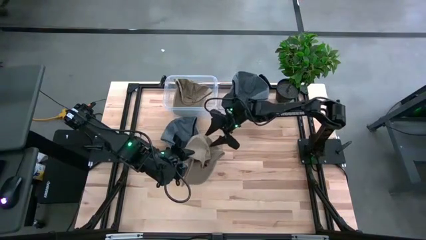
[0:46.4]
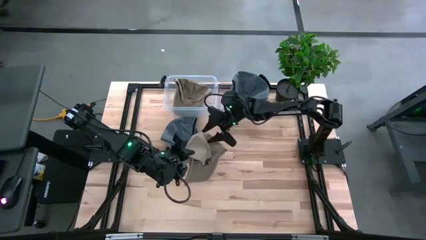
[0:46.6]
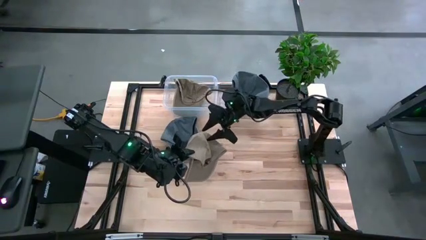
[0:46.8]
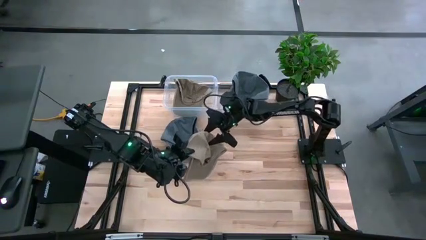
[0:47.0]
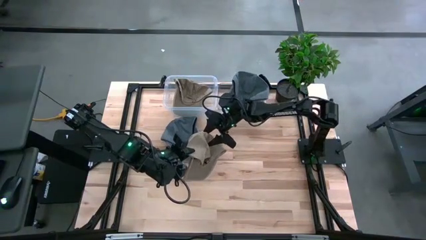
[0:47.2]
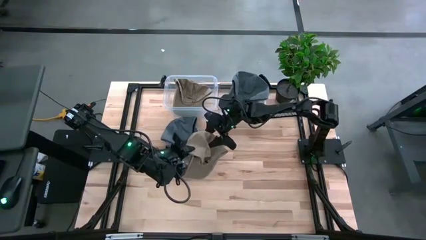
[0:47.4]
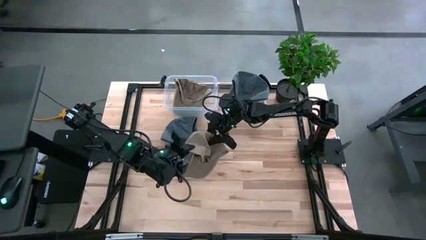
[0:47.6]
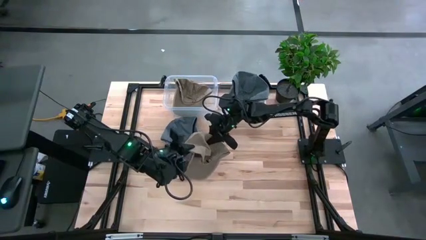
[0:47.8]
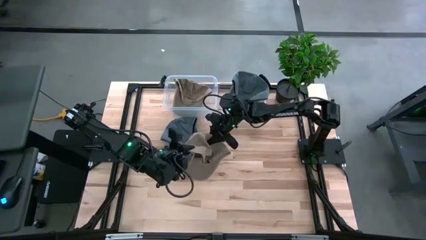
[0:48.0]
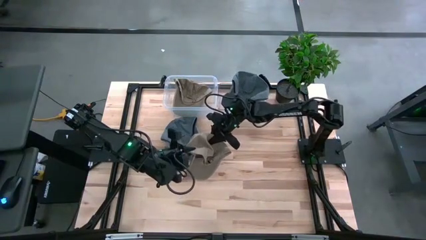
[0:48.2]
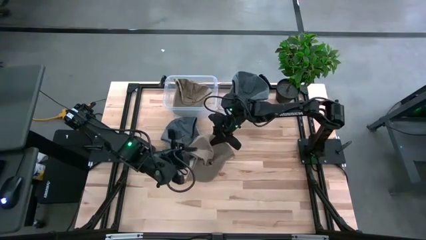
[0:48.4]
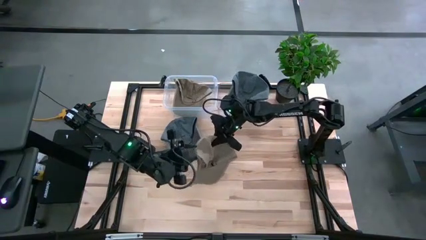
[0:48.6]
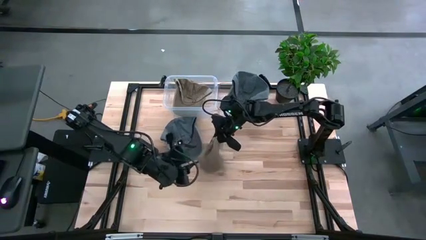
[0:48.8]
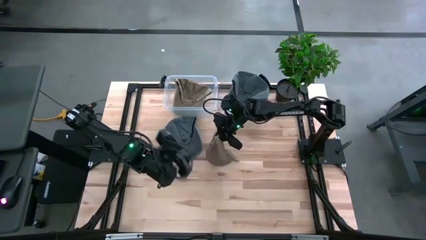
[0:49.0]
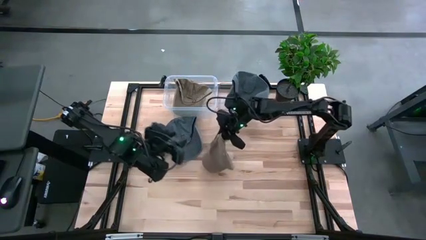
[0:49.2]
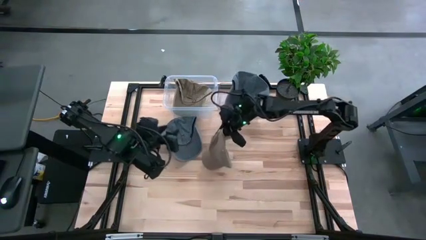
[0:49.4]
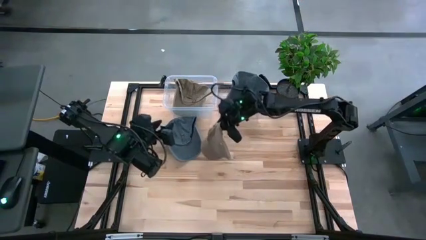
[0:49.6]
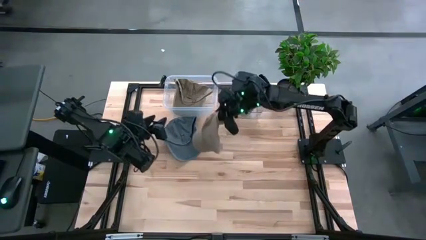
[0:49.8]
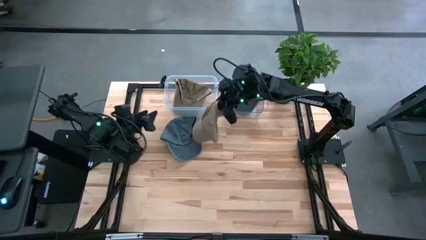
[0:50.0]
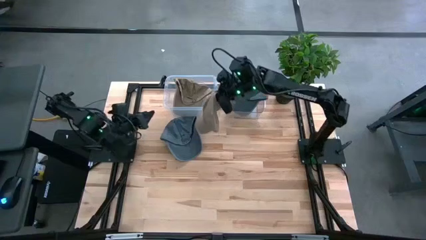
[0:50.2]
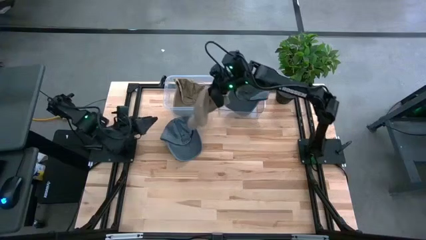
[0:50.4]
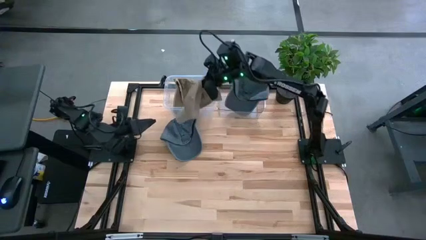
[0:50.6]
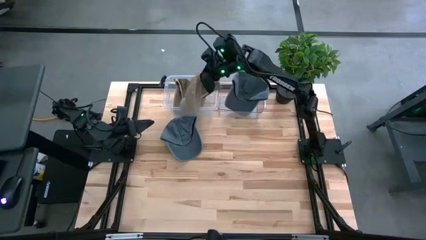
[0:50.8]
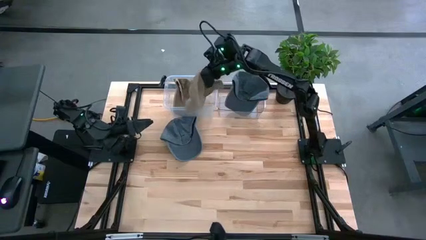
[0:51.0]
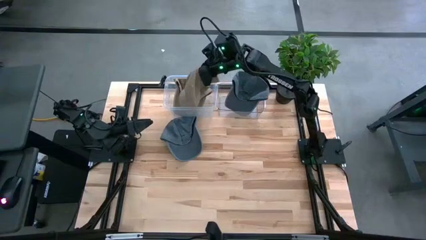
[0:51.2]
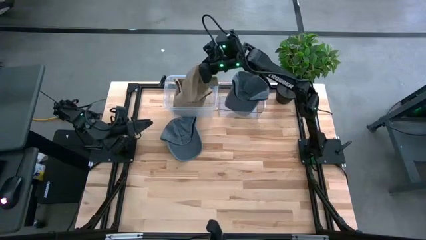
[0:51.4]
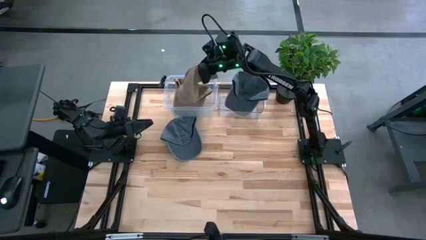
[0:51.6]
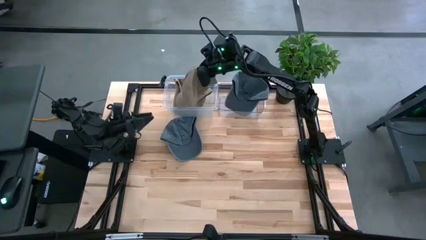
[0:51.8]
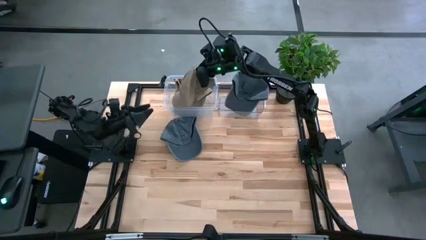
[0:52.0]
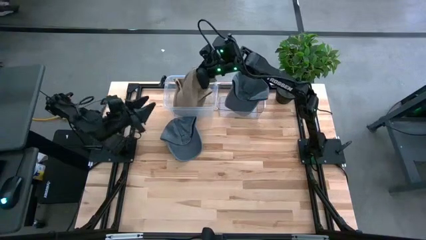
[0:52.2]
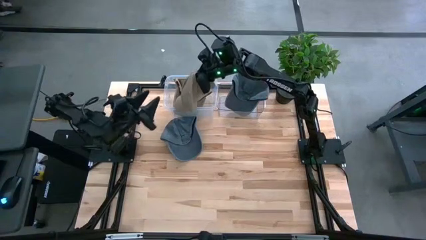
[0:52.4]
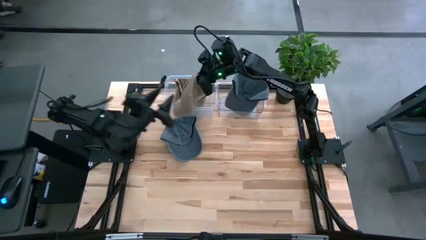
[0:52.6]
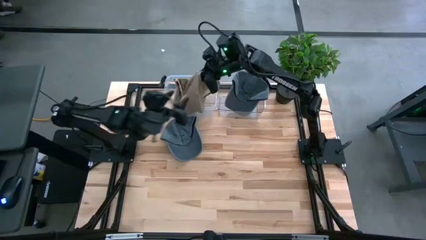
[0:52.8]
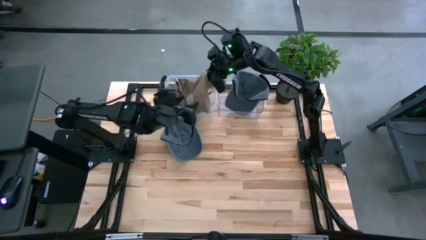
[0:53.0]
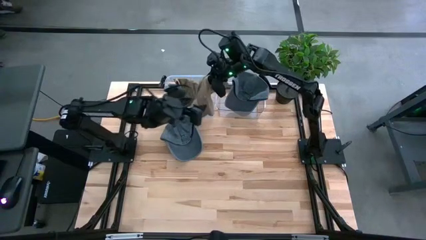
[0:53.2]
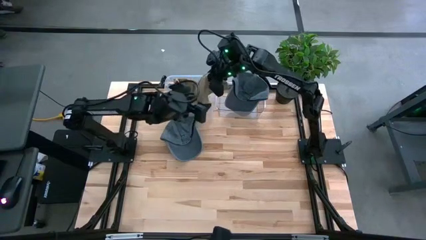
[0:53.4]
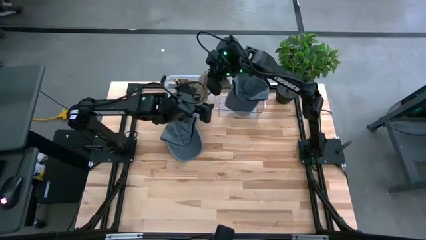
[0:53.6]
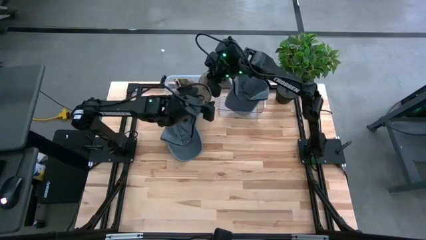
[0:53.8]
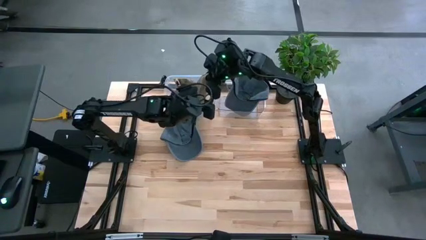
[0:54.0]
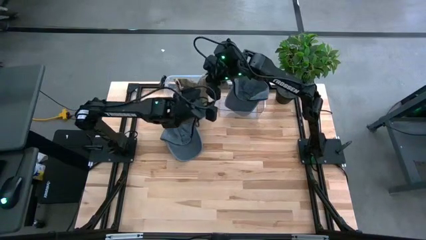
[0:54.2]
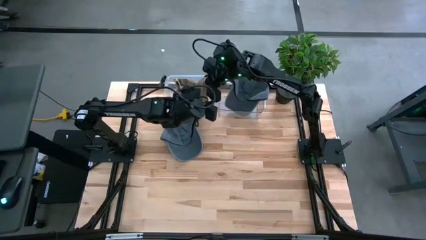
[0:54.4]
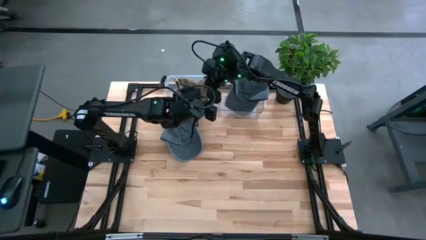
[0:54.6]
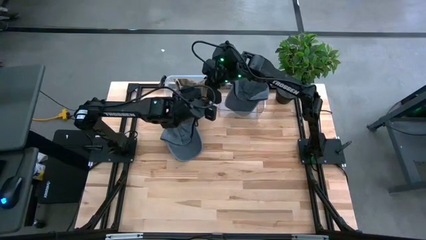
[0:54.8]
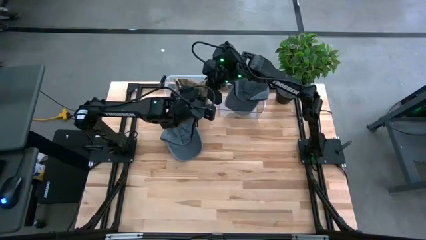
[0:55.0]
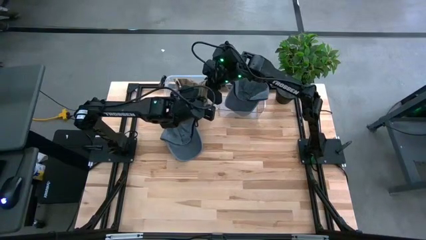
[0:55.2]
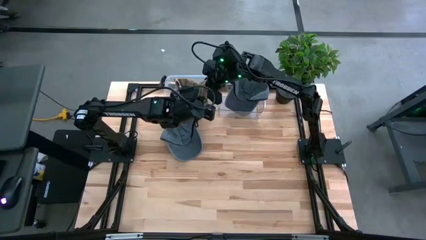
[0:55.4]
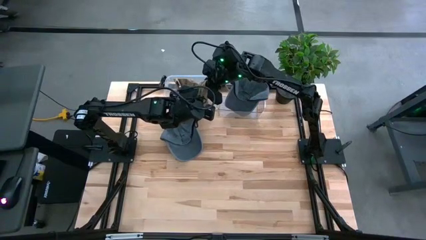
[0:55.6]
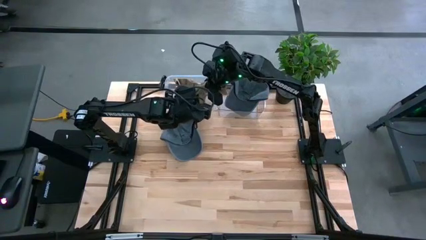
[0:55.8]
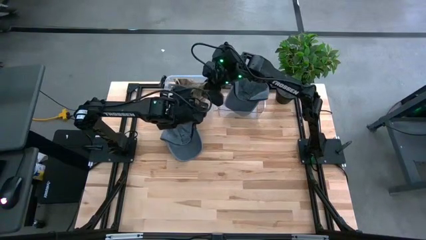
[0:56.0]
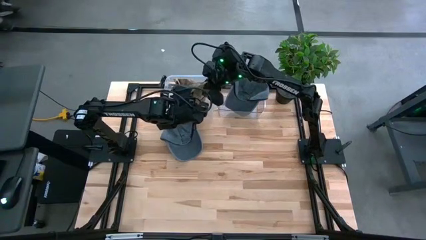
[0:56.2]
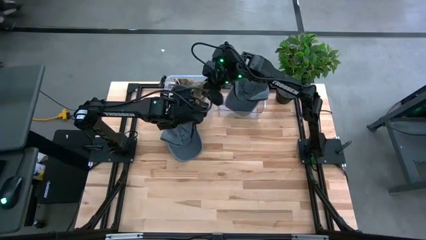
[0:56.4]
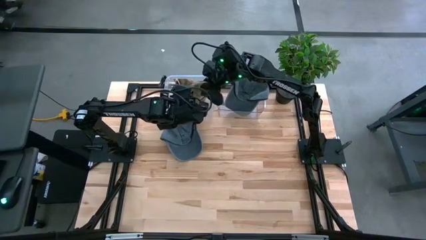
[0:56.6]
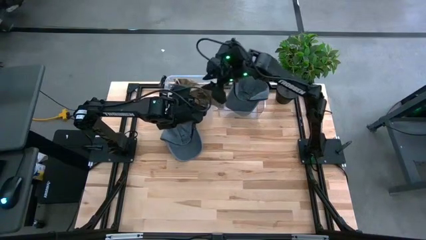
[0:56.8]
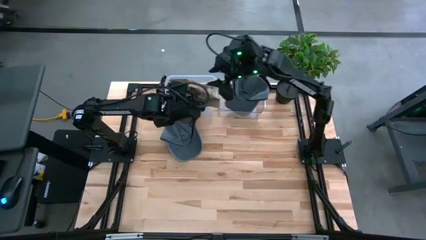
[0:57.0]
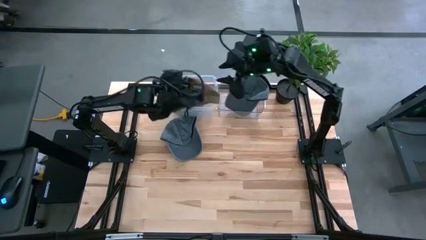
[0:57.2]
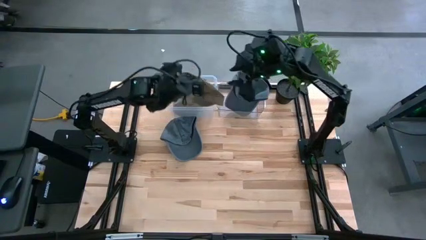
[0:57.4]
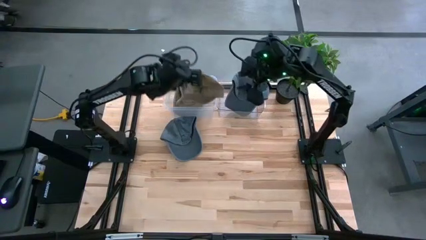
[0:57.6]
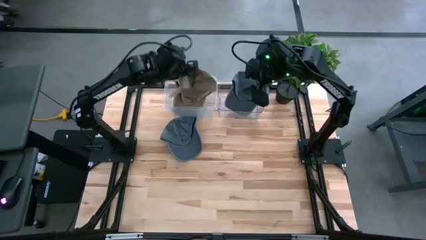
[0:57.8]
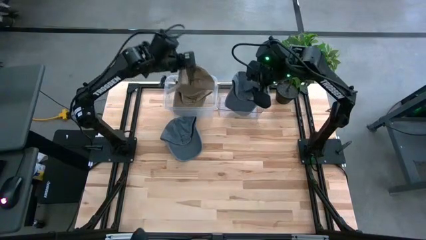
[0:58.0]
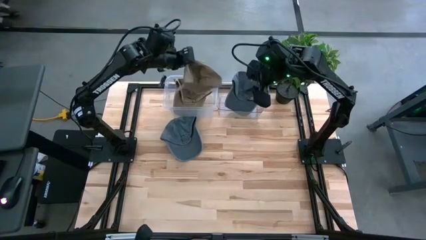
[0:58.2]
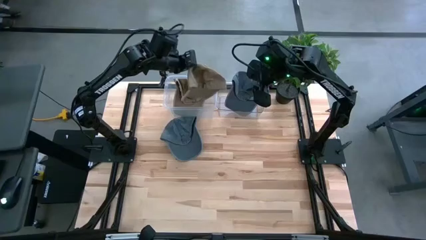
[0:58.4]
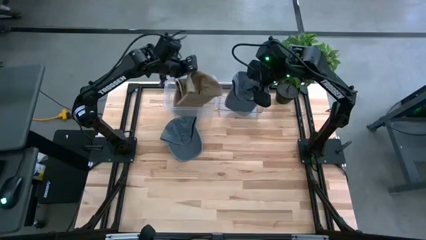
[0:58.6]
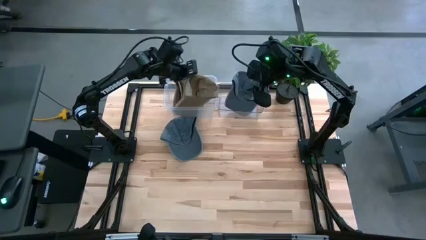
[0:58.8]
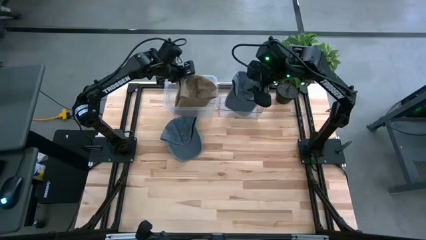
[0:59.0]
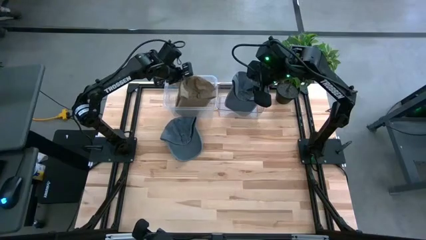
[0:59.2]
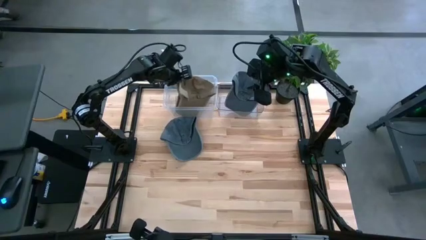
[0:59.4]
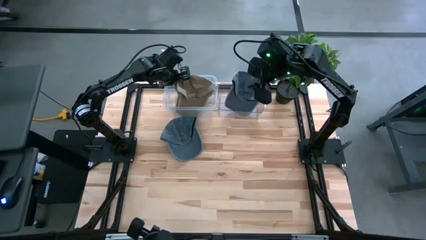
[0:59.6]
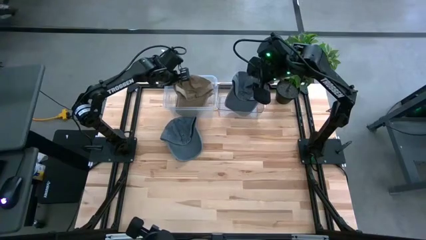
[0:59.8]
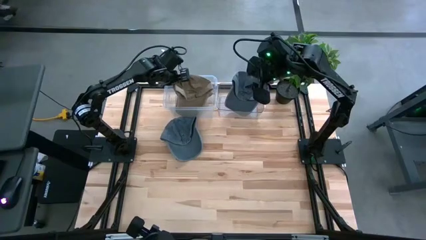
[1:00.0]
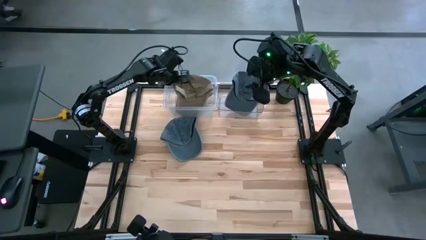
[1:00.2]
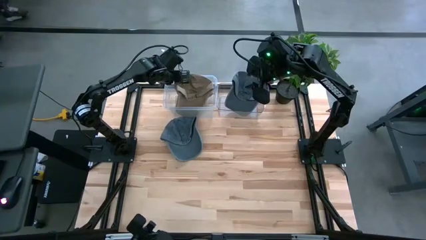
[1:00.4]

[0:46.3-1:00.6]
Task: Pick & Place hat
Put the brown cap into the white bin
